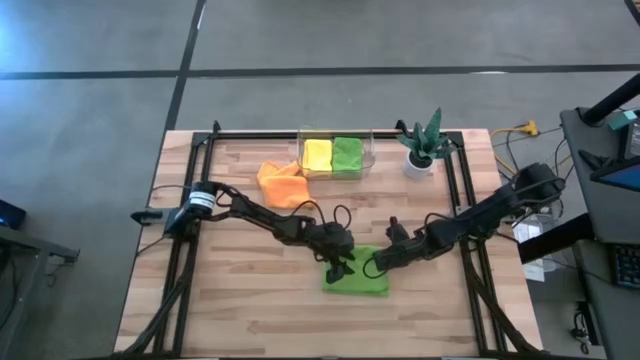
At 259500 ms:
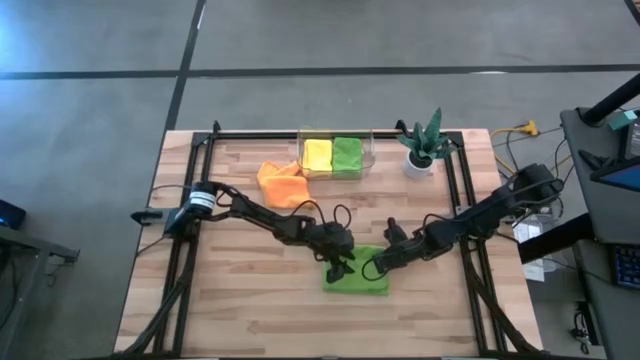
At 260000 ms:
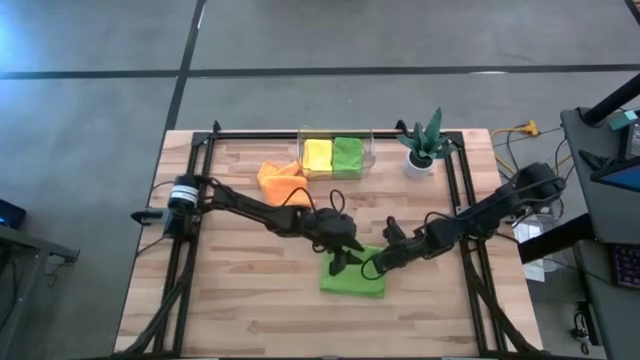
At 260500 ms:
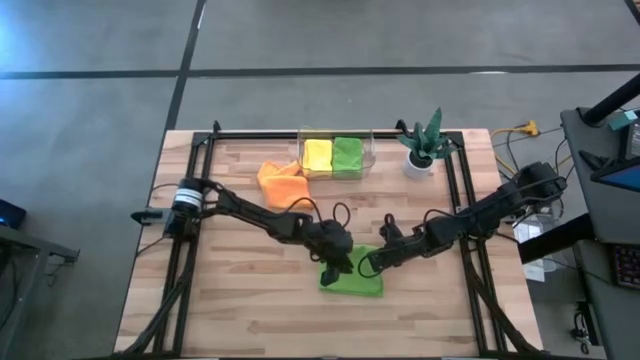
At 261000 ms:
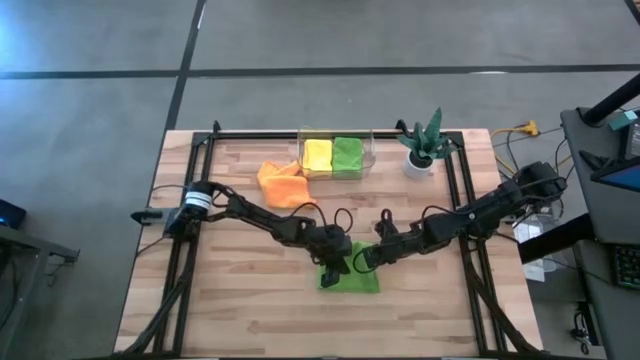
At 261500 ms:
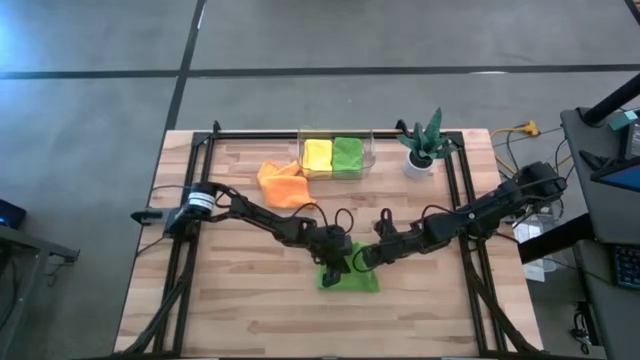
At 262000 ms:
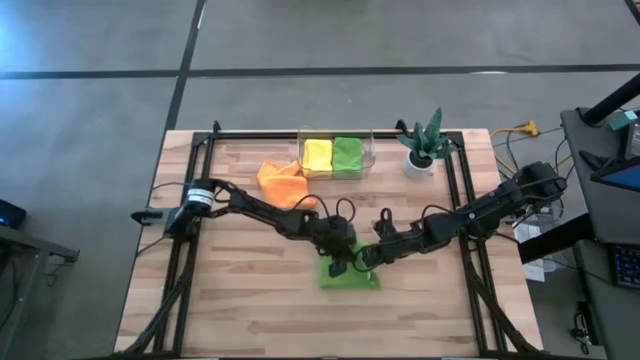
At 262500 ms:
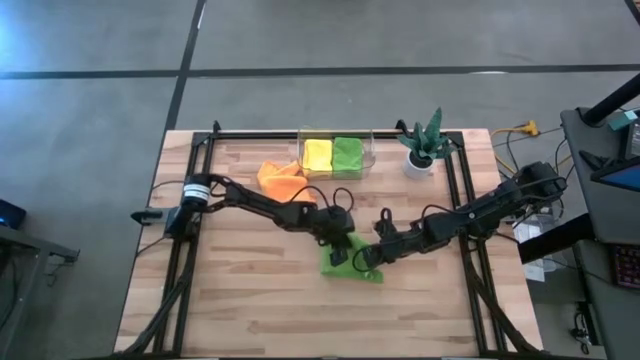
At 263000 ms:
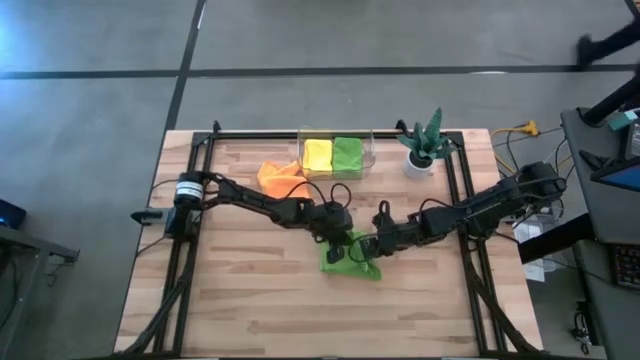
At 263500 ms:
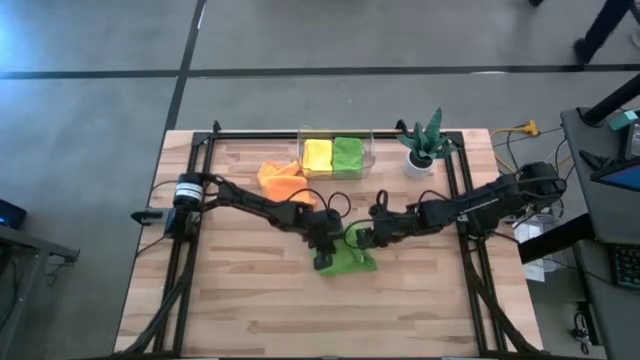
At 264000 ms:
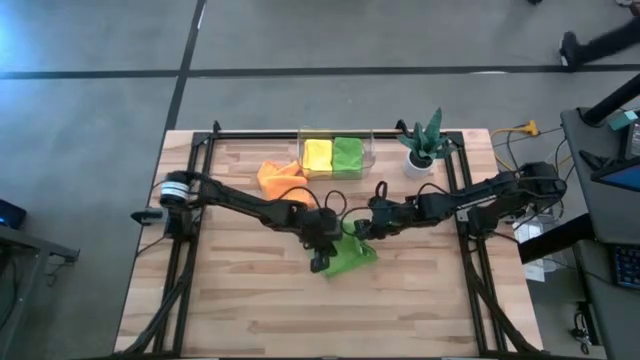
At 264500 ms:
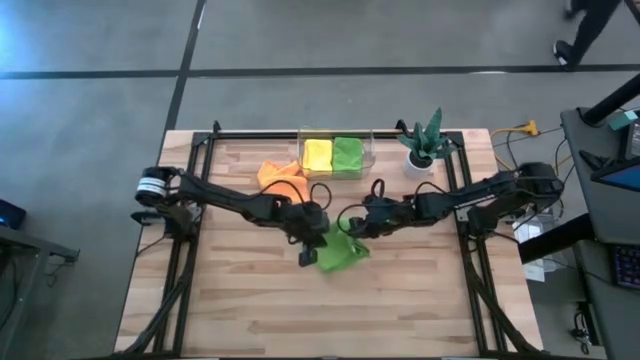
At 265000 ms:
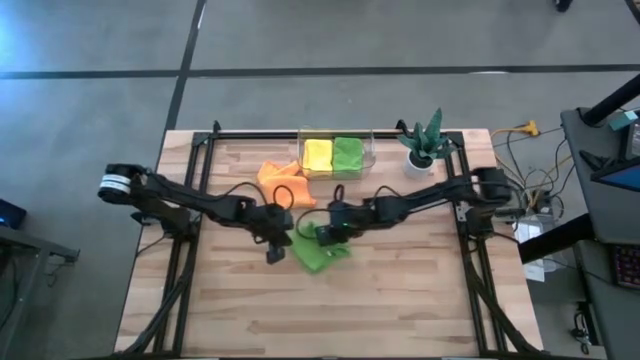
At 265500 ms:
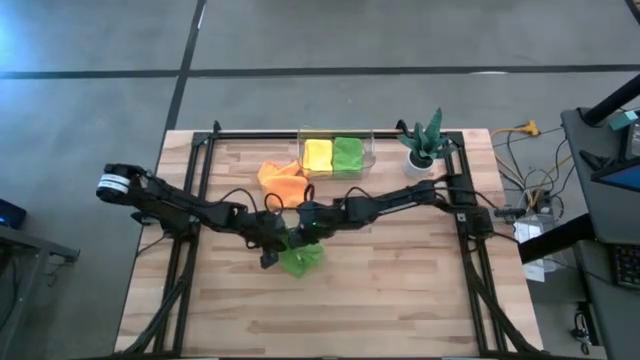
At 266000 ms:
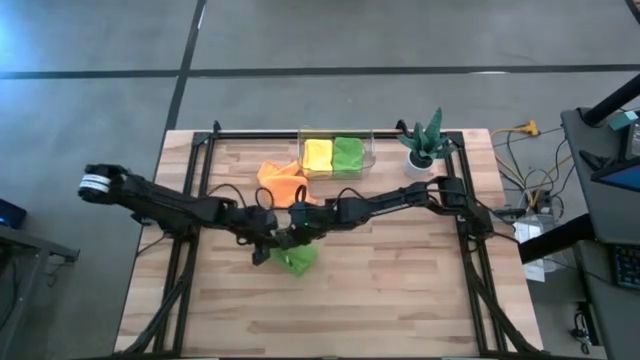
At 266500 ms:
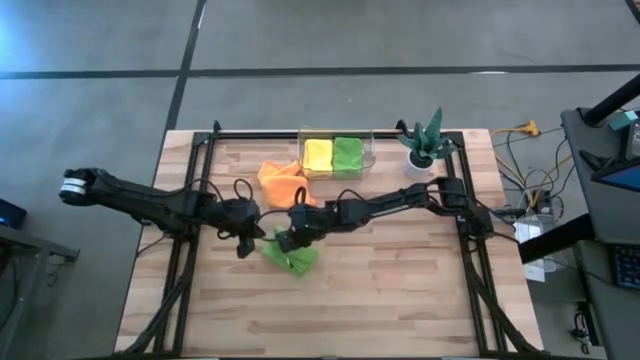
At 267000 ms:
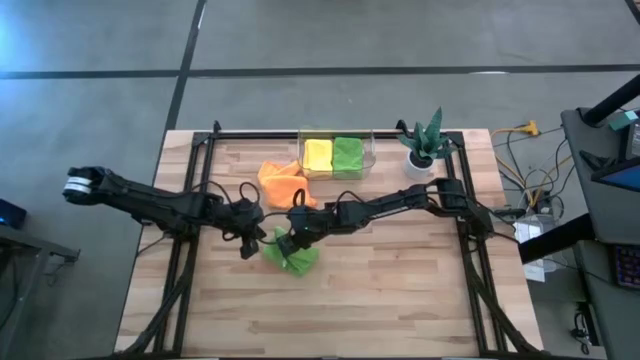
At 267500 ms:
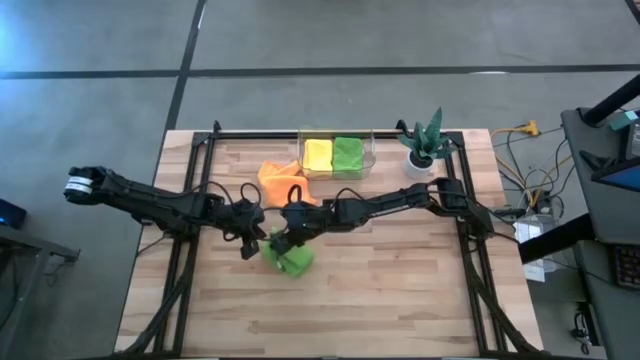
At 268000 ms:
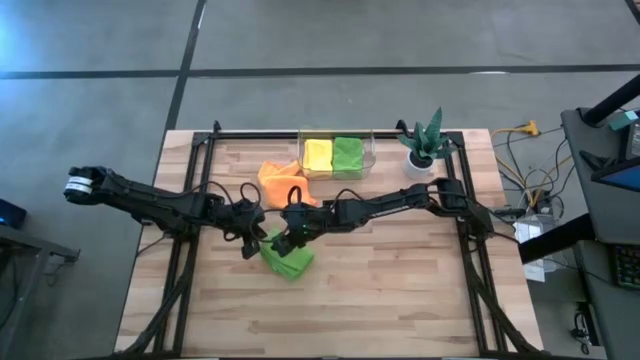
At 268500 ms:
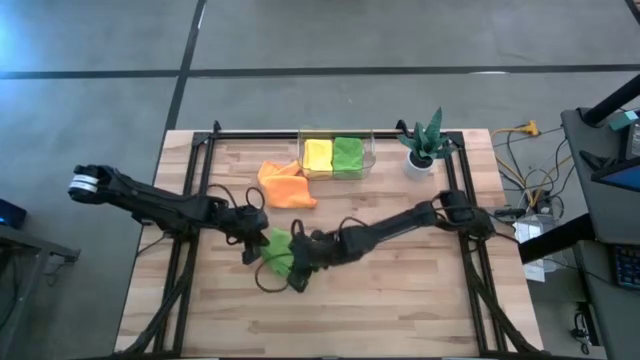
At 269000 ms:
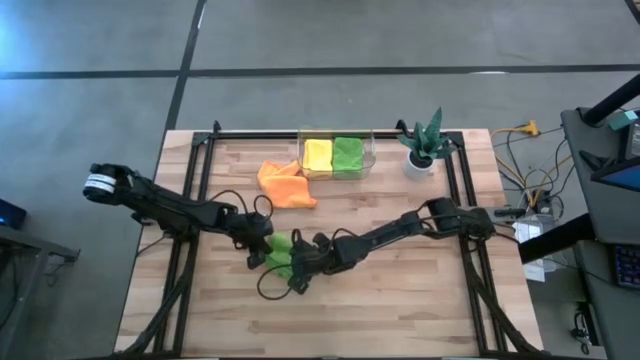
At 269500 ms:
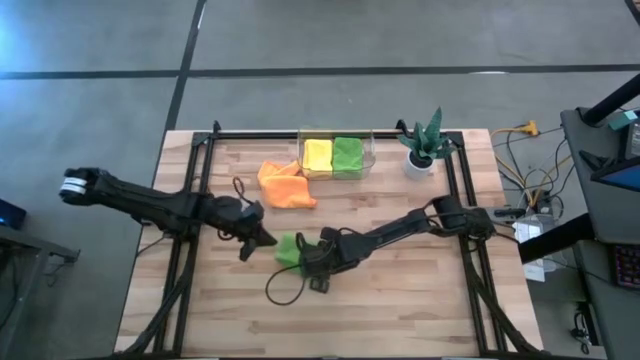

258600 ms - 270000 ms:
Task: Fold microfiber towels
Fold the green microfiber towel

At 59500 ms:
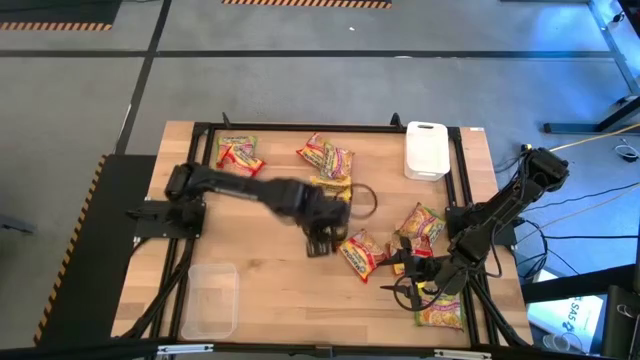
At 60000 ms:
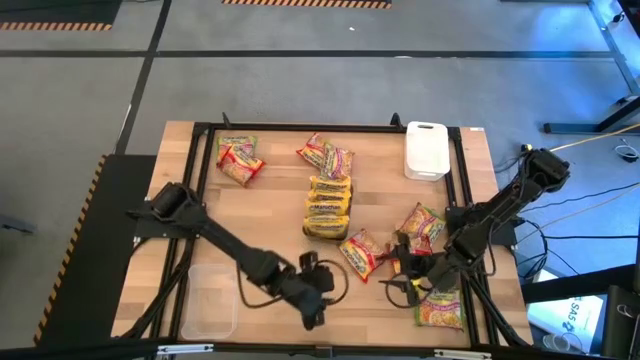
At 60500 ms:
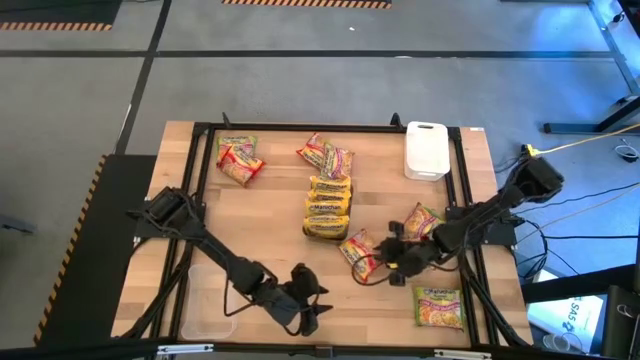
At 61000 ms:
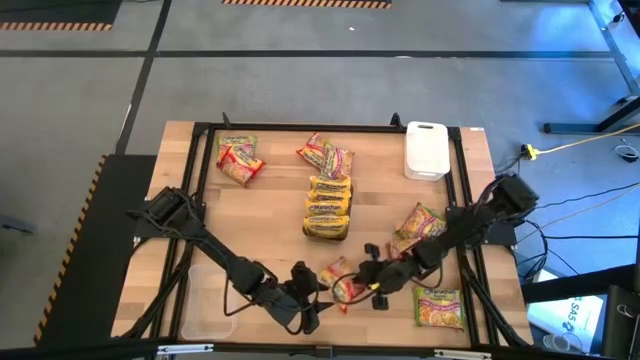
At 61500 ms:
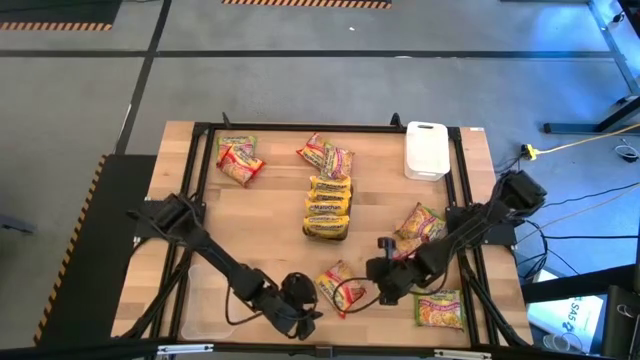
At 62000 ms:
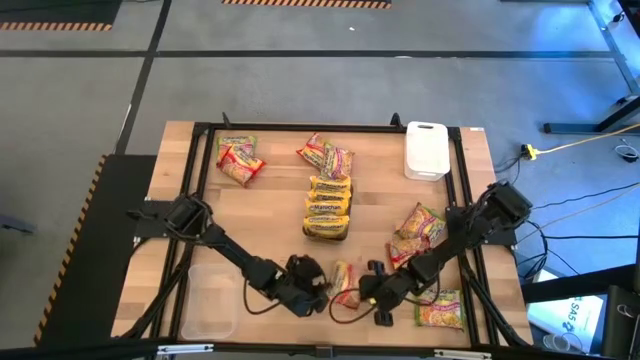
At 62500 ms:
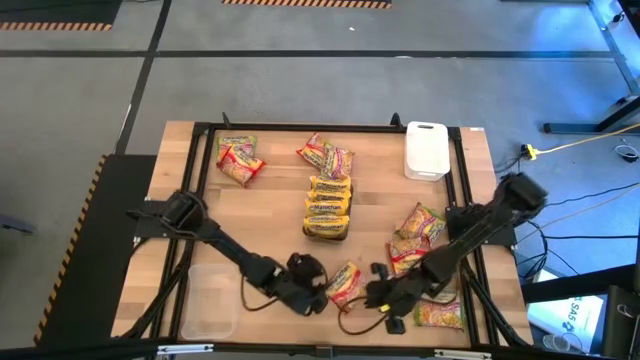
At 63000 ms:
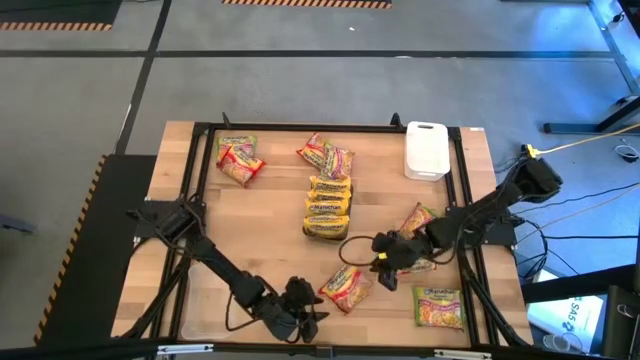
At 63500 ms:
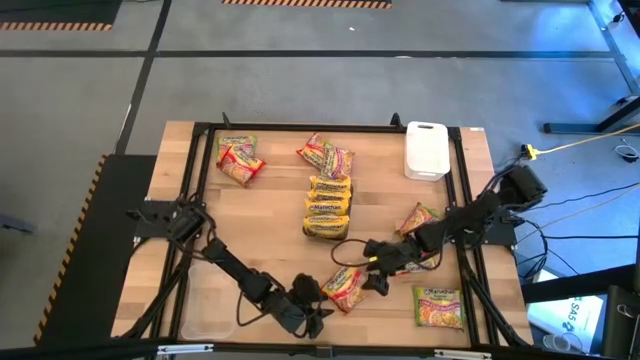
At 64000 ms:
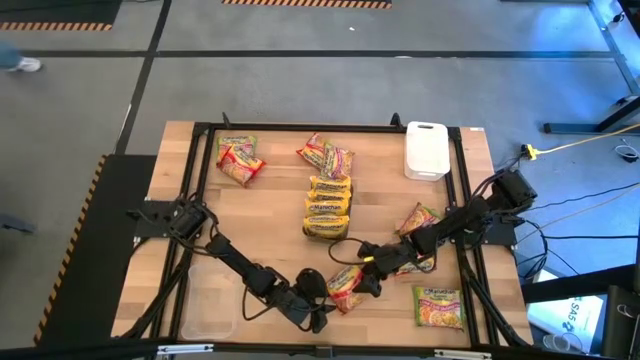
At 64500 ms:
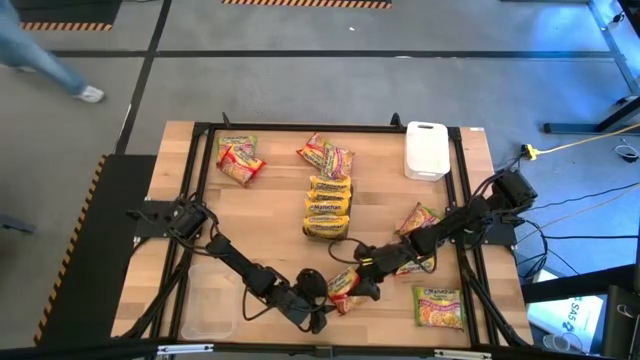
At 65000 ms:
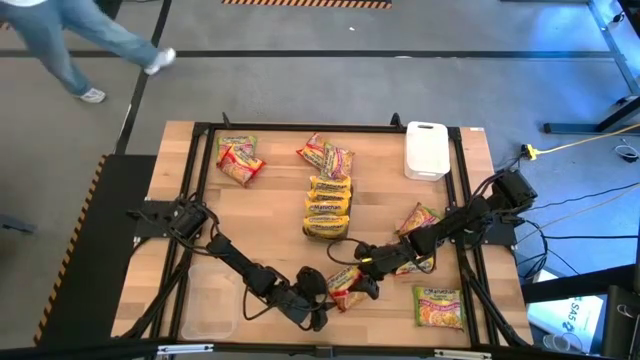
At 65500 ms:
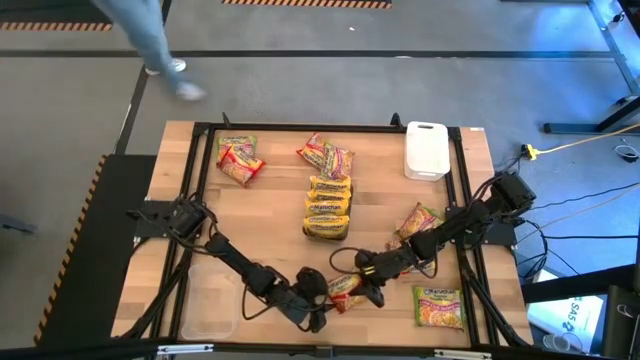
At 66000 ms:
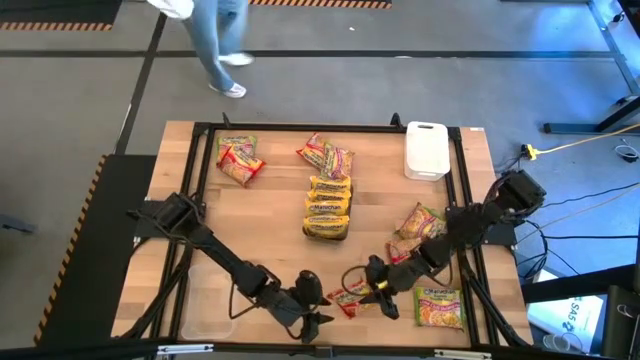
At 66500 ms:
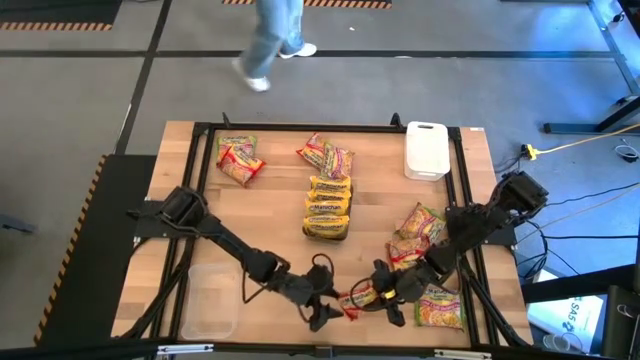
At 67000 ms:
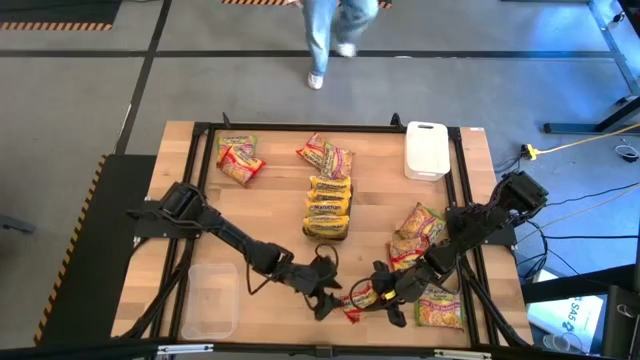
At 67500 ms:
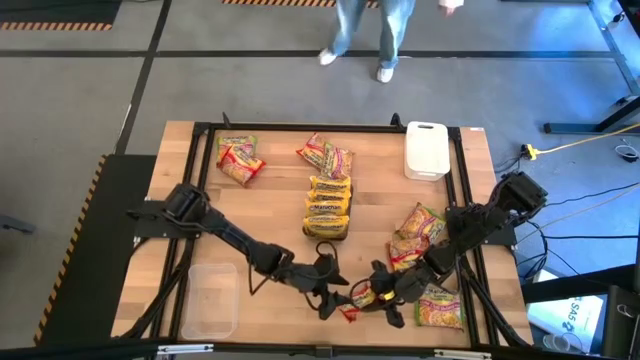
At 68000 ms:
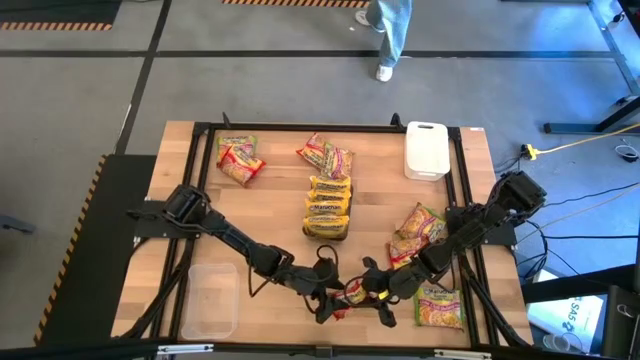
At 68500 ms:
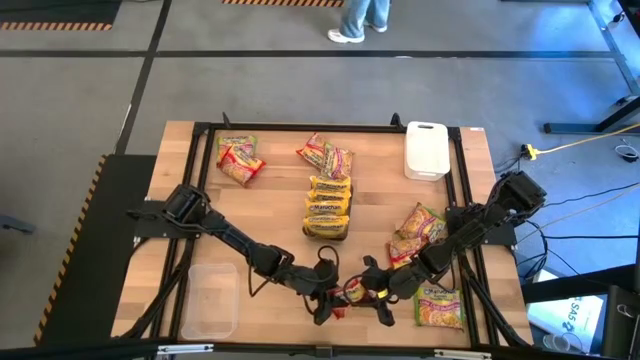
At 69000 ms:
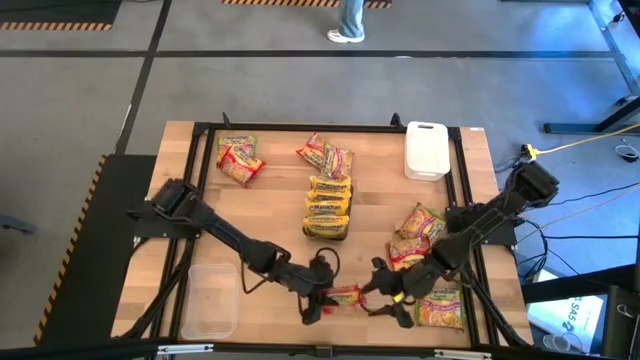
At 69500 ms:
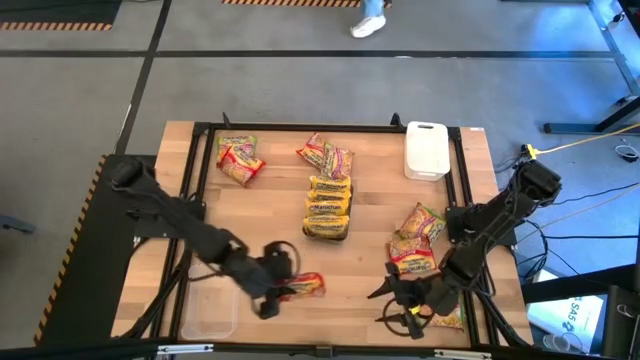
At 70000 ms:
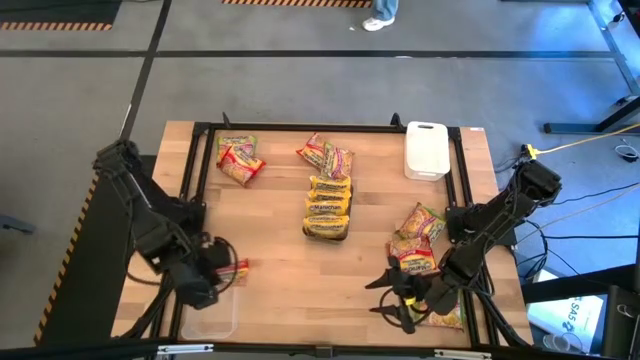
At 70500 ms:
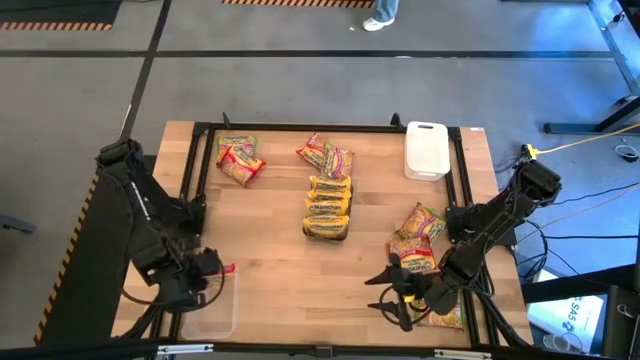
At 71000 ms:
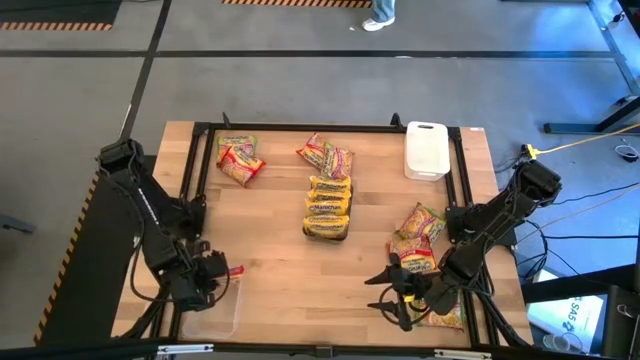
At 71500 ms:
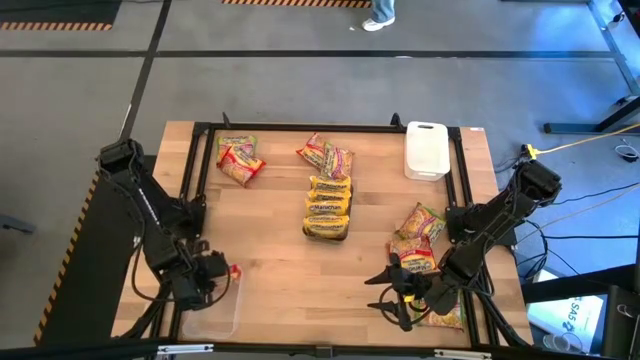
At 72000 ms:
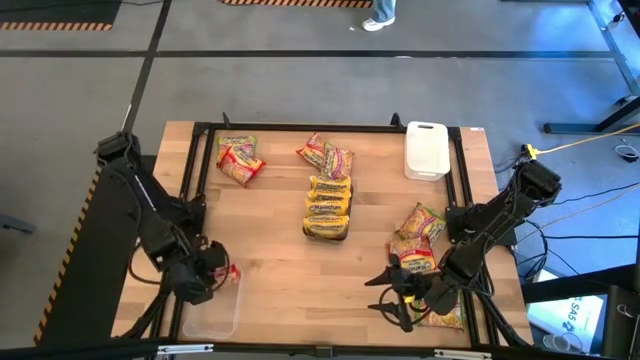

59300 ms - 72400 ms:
Task: Sort Maruchan noodles
Put the red noodle pack into the transparent bin
